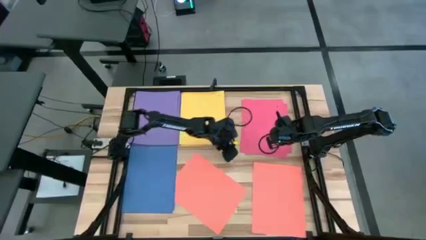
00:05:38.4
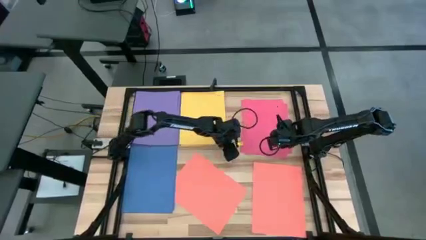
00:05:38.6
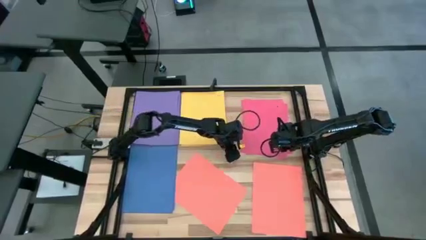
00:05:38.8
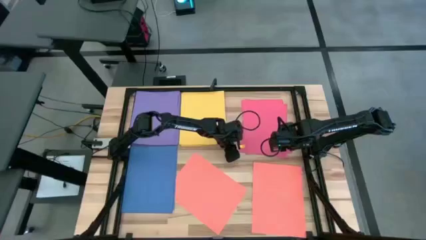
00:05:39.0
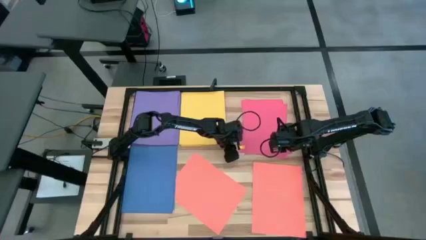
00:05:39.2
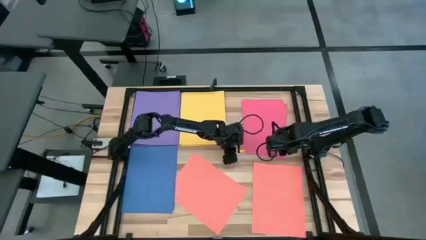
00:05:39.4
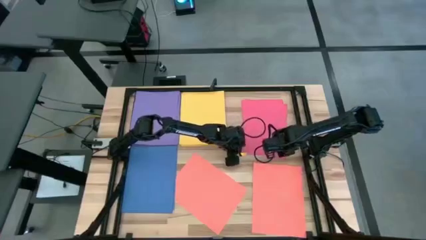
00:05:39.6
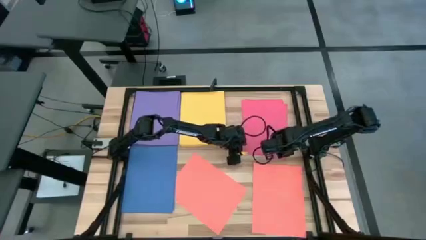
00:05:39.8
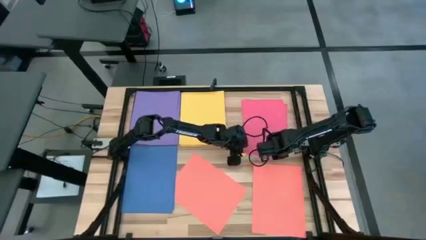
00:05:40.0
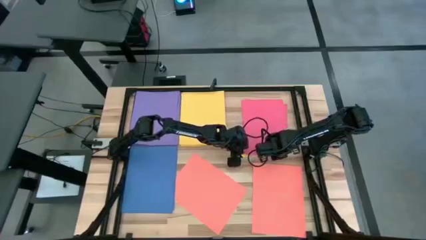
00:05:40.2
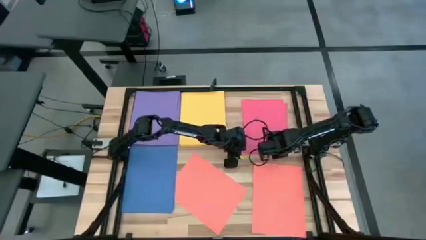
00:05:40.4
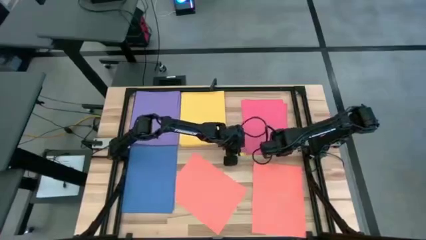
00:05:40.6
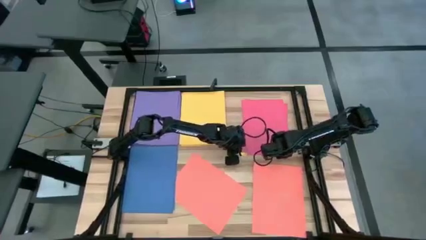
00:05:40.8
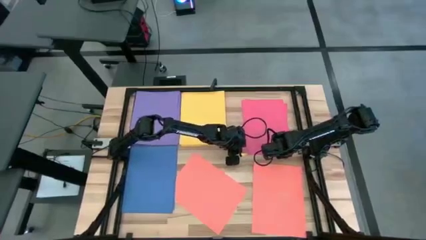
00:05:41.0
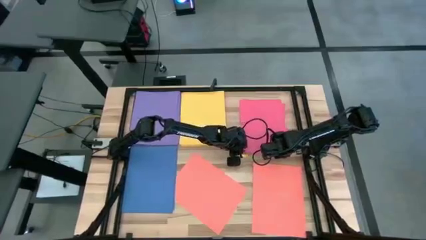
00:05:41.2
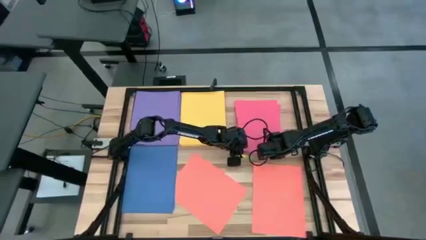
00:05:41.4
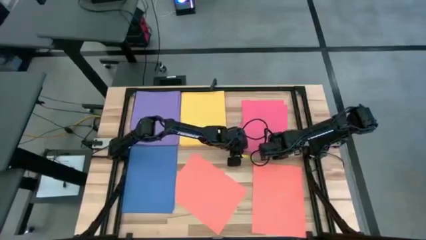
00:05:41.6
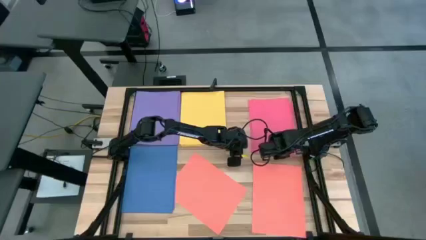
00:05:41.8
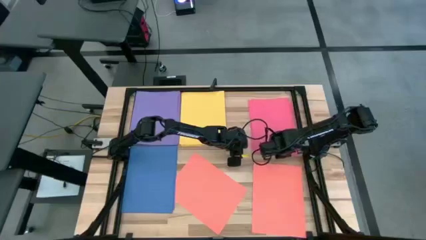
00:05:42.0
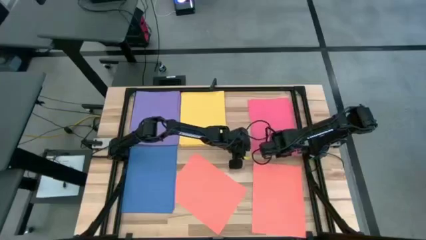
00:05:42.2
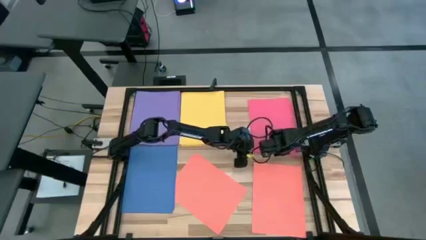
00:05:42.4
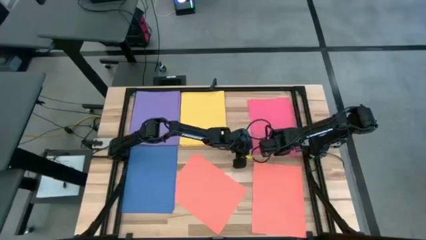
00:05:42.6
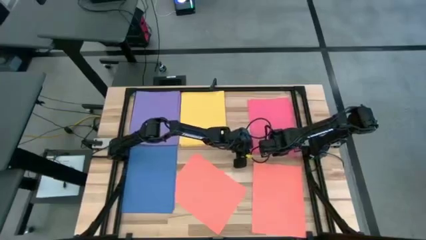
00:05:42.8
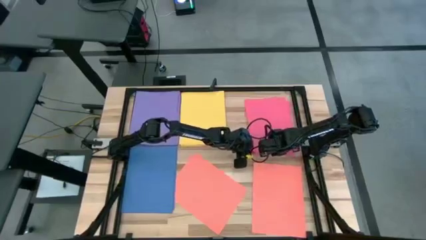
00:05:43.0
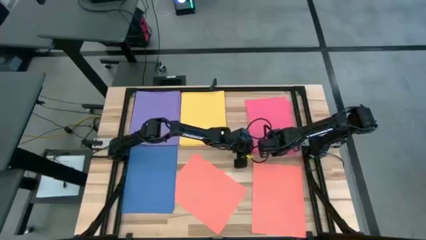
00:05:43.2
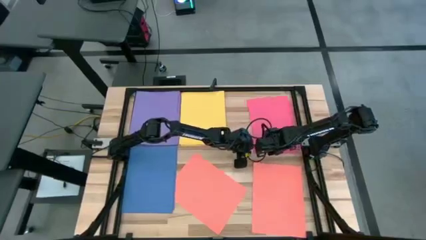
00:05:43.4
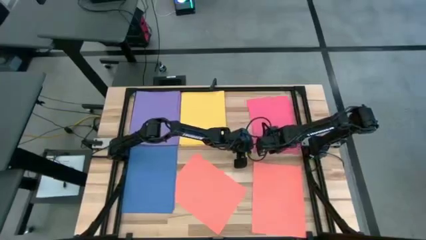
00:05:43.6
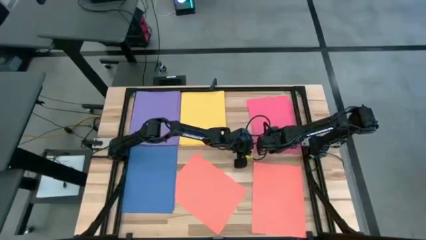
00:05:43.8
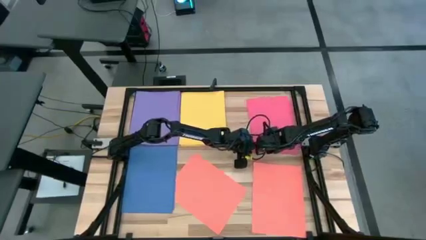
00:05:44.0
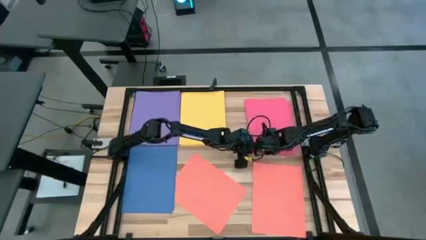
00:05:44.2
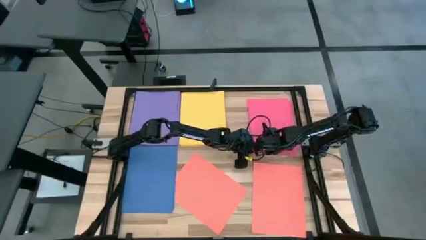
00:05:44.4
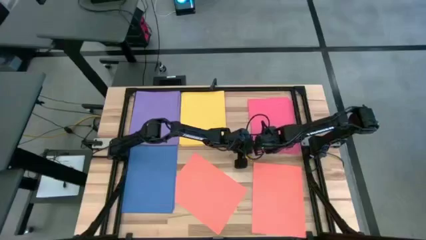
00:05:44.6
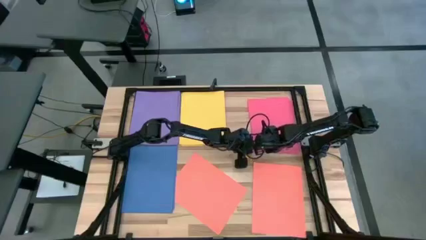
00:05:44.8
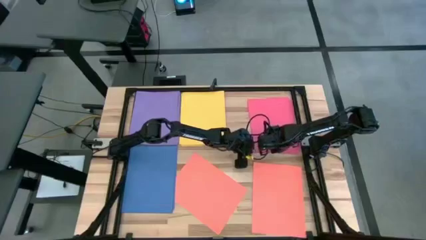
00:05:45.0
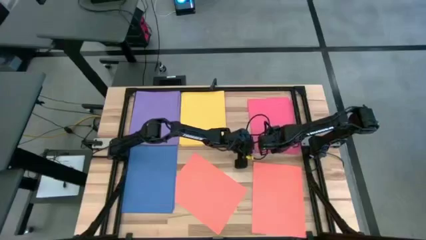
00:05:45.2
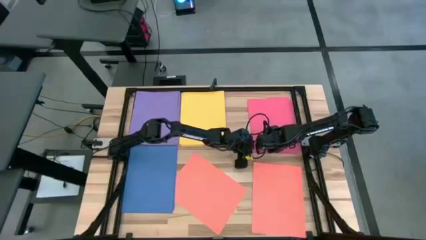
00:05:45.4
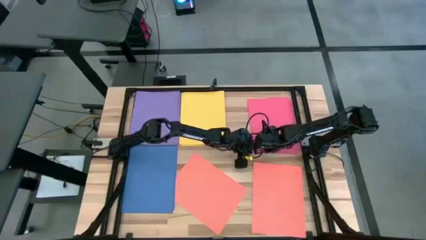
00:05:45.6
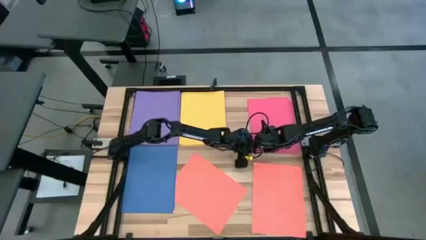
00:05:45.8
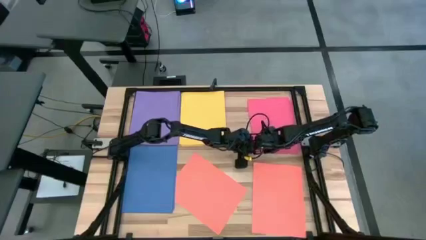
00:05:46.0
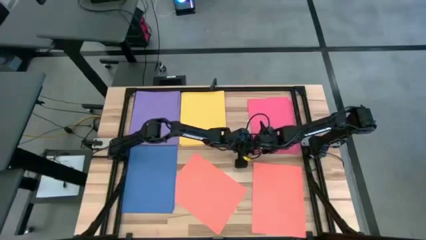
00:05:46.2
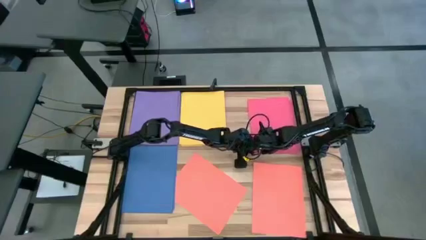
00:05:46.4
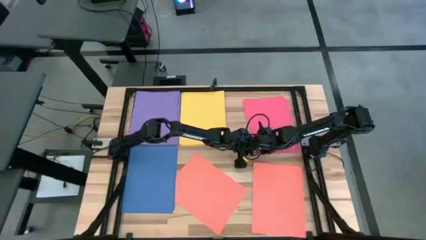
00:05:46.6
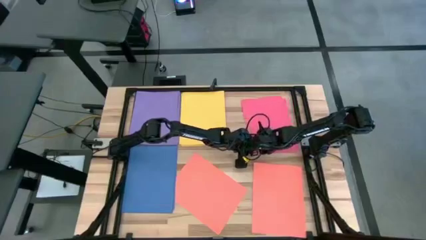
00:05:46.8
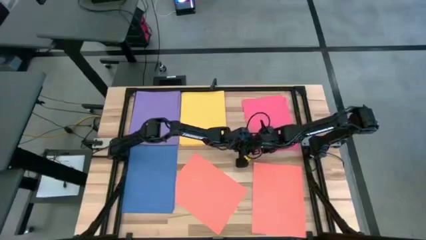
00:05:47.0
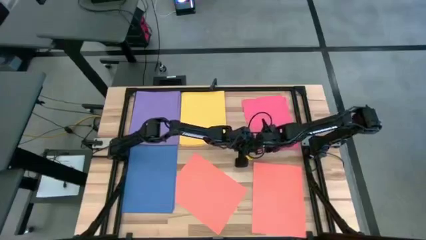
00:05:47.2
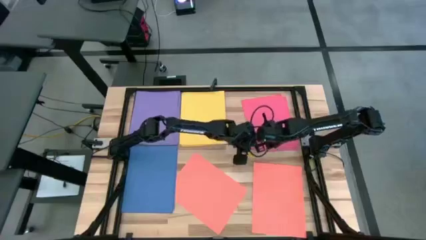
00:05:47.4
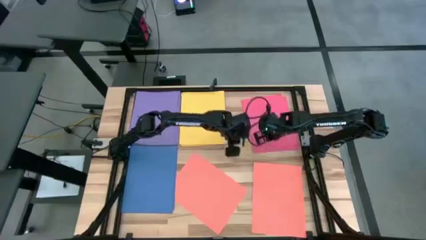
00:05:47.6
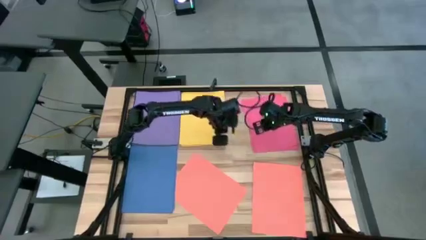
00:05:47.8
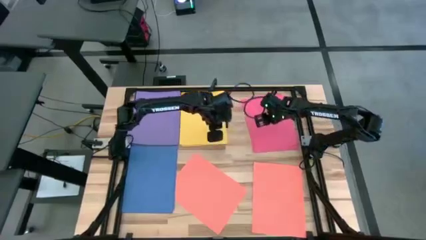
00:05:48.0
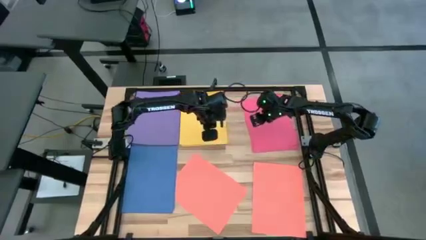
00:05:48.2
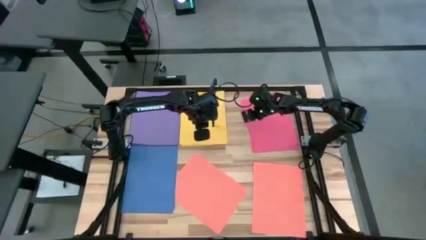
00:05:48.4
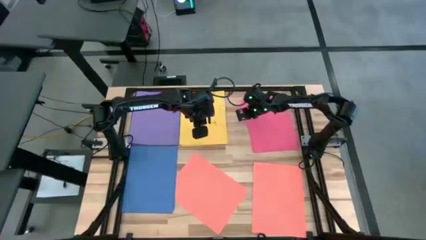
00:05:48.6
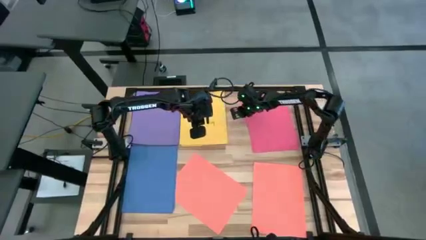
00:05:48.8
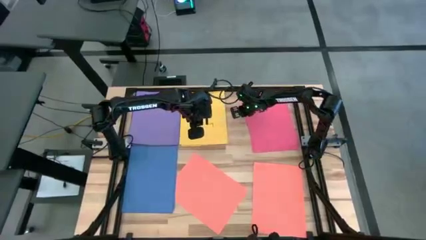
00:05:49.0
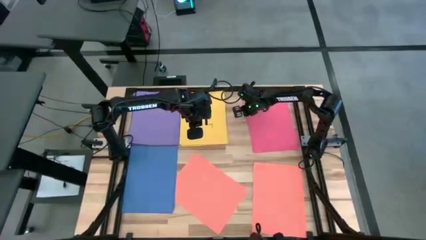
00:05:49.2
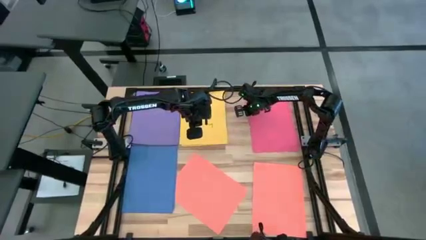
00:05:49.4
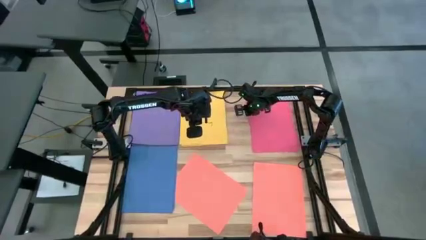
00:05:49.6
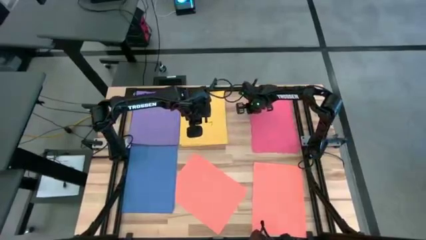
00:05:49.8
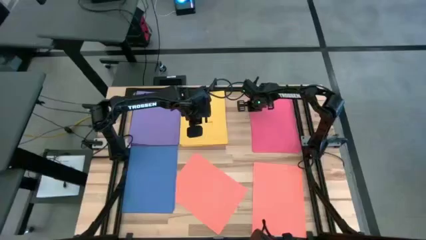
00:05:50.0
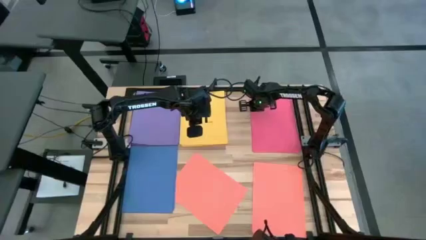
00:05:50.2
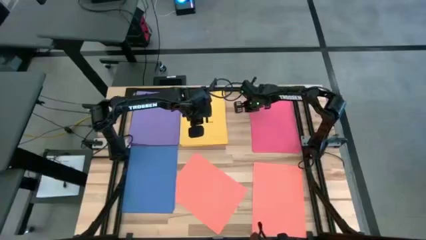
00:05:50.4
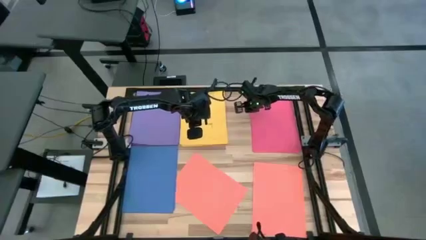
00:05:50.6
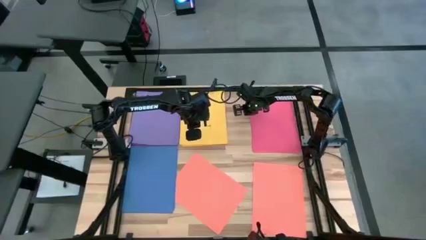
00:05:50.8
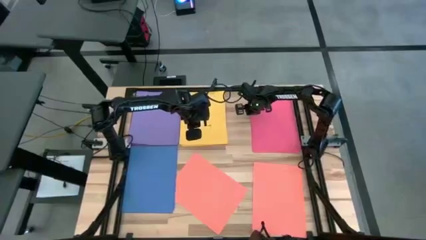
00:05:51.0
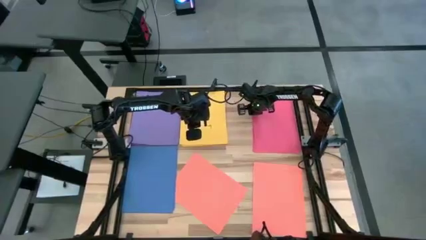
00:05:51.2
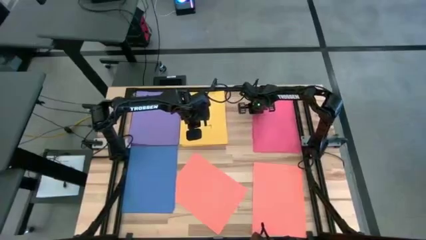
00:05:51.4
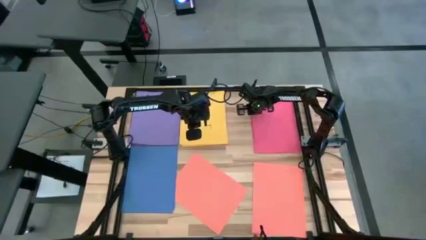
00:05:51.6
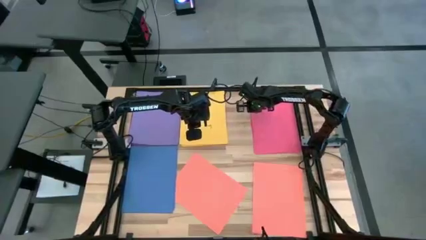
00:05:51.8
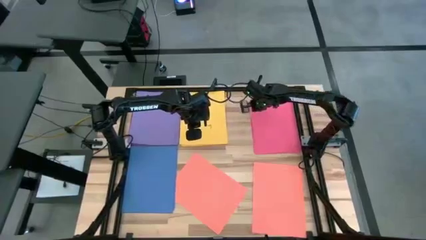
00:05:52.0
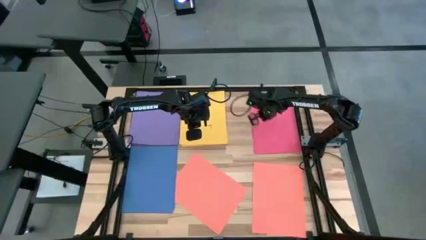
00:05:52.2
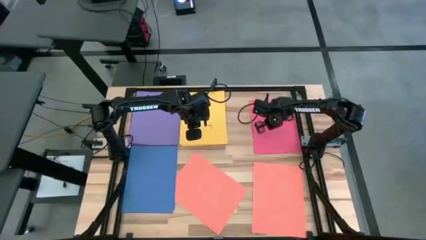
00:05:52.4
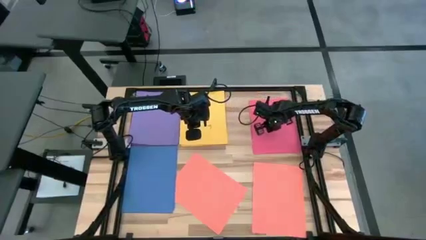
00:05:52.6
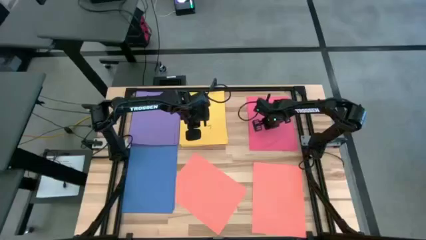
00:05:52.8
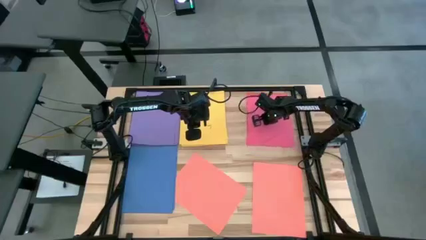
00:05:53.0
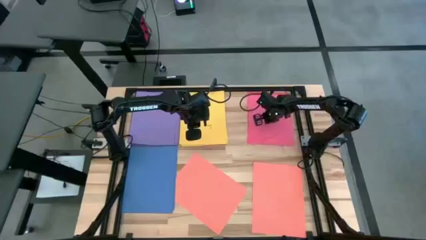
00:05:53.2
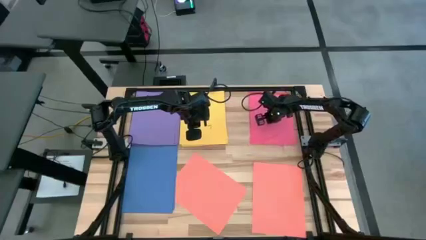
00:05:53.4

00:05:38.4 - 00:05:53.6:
Task: Organize paper
Stack the red paper on top of the red paper
